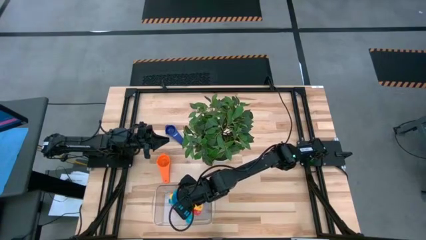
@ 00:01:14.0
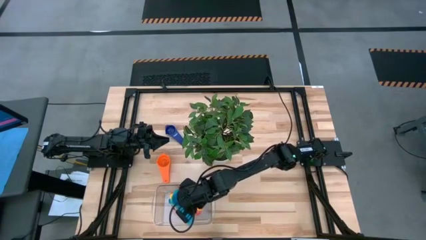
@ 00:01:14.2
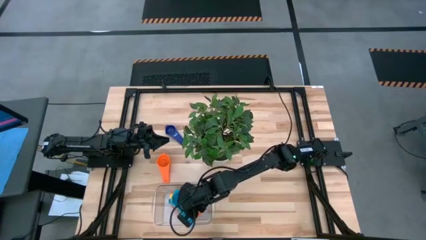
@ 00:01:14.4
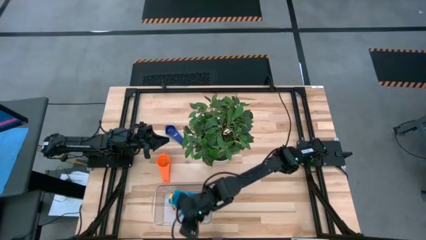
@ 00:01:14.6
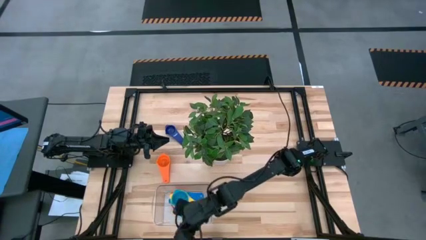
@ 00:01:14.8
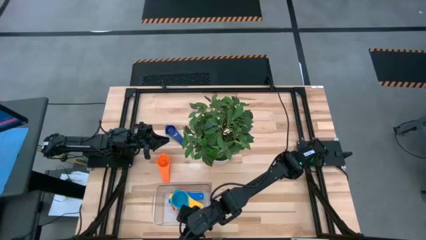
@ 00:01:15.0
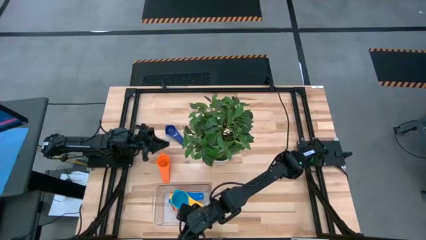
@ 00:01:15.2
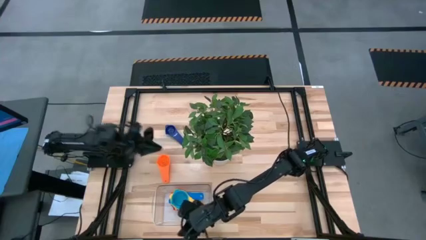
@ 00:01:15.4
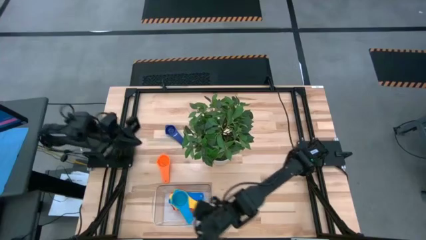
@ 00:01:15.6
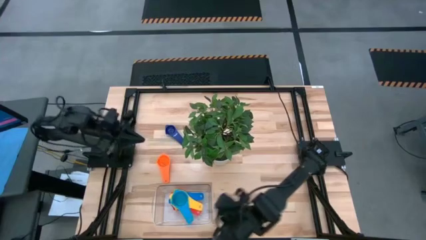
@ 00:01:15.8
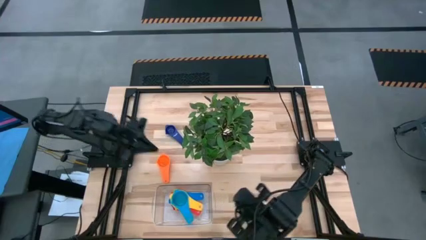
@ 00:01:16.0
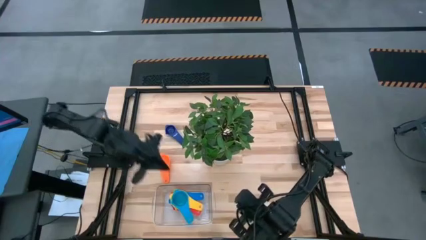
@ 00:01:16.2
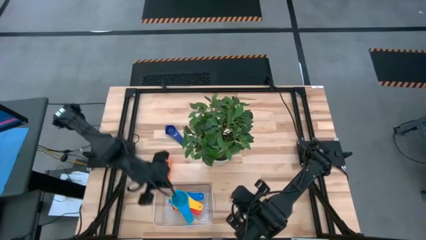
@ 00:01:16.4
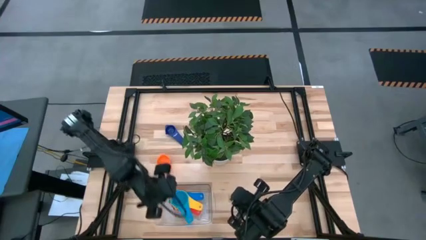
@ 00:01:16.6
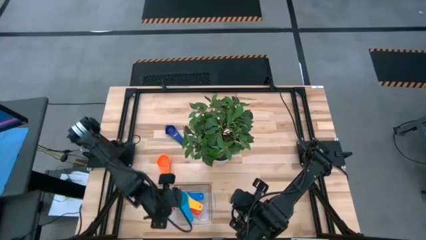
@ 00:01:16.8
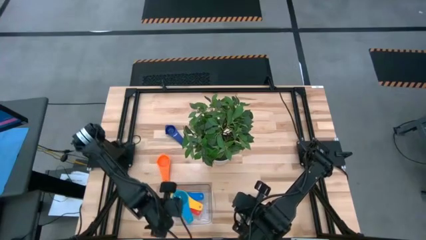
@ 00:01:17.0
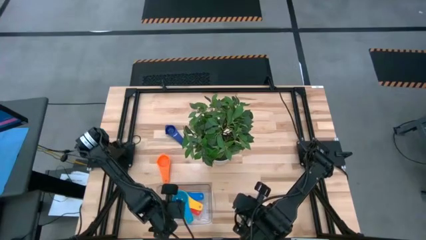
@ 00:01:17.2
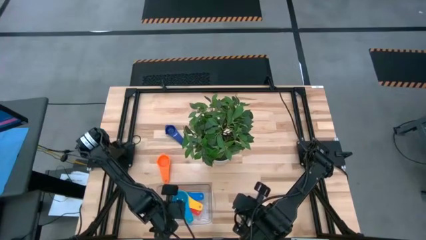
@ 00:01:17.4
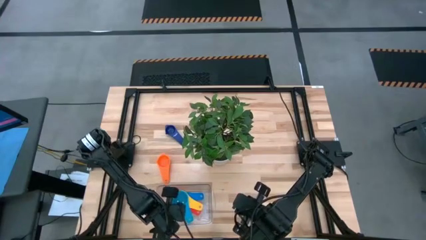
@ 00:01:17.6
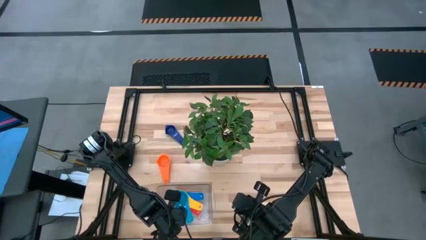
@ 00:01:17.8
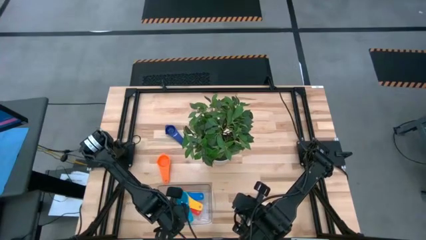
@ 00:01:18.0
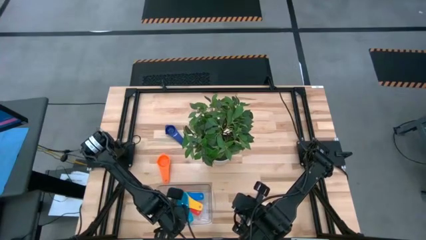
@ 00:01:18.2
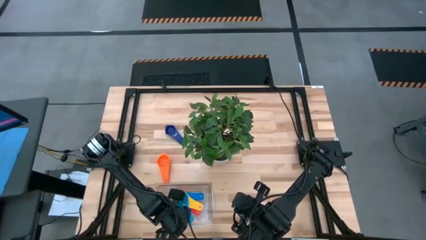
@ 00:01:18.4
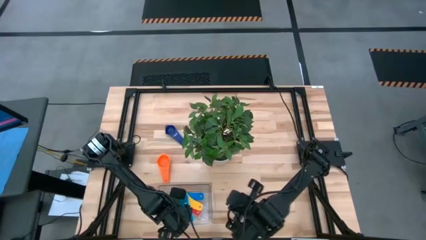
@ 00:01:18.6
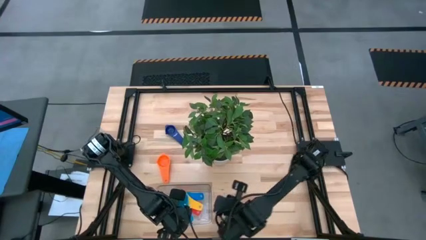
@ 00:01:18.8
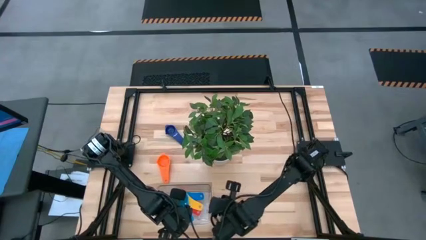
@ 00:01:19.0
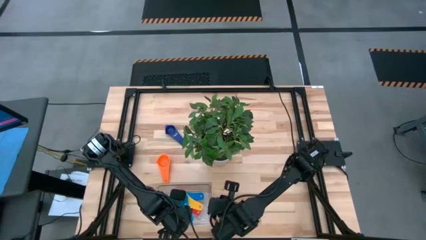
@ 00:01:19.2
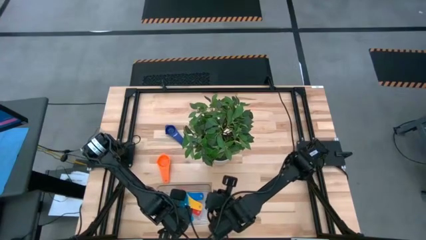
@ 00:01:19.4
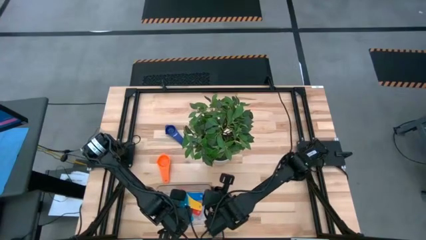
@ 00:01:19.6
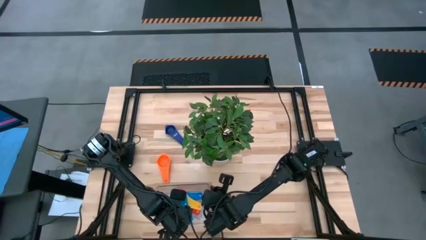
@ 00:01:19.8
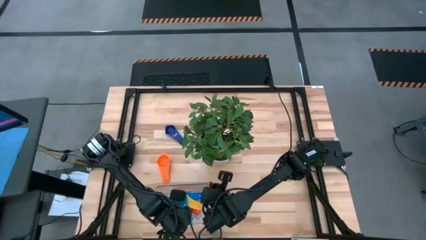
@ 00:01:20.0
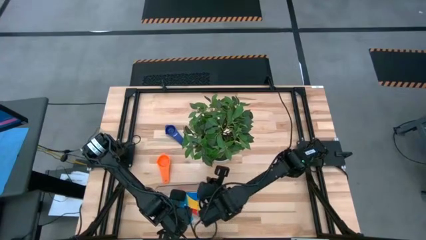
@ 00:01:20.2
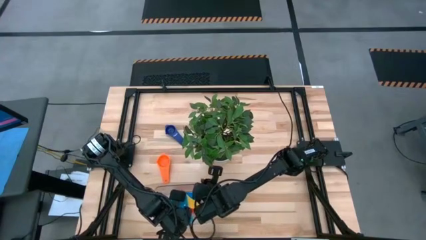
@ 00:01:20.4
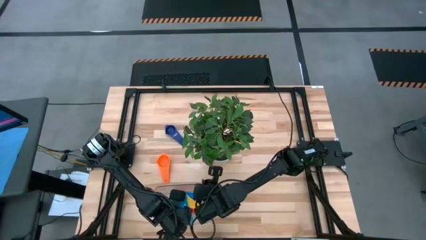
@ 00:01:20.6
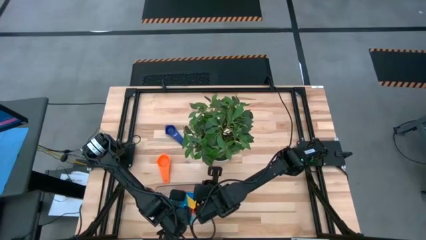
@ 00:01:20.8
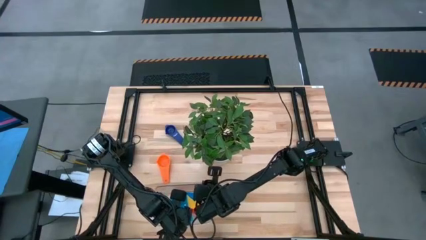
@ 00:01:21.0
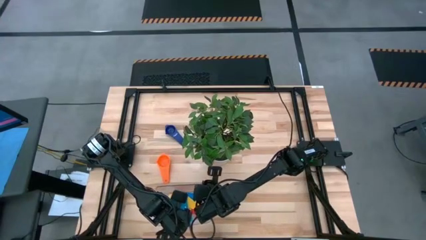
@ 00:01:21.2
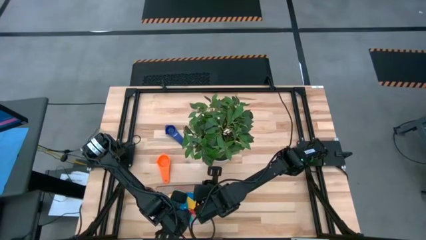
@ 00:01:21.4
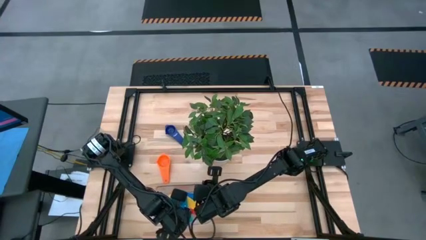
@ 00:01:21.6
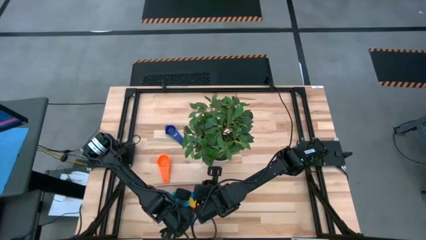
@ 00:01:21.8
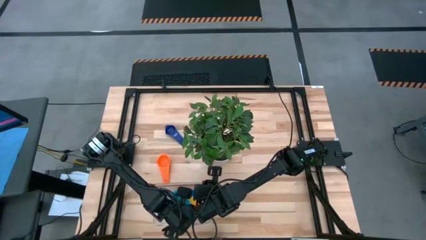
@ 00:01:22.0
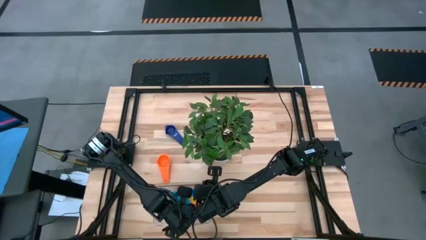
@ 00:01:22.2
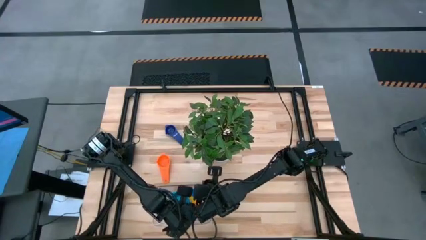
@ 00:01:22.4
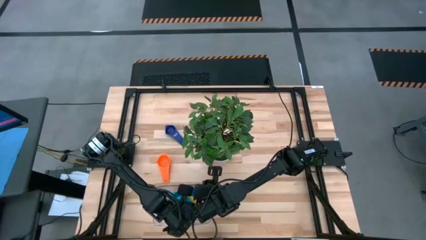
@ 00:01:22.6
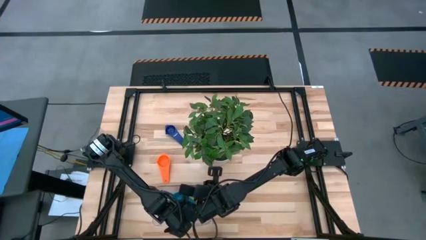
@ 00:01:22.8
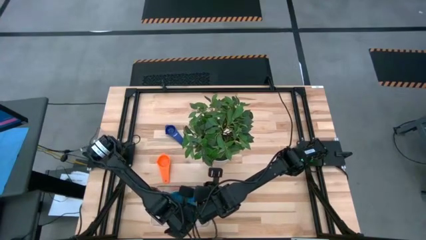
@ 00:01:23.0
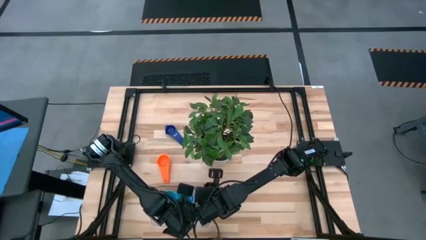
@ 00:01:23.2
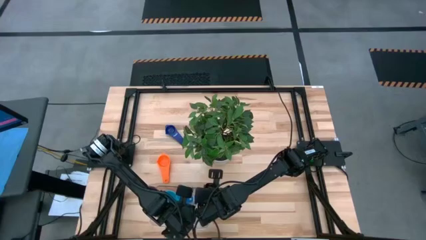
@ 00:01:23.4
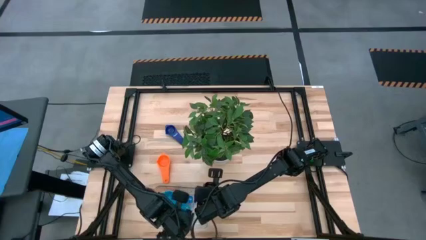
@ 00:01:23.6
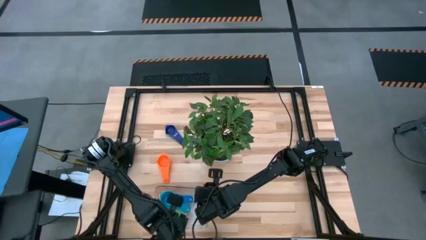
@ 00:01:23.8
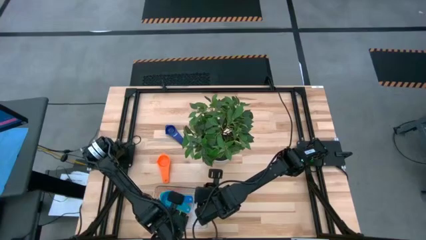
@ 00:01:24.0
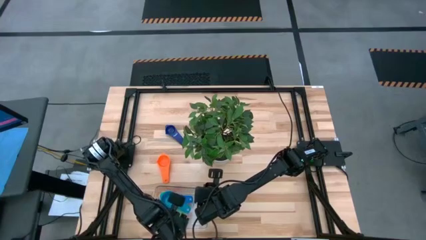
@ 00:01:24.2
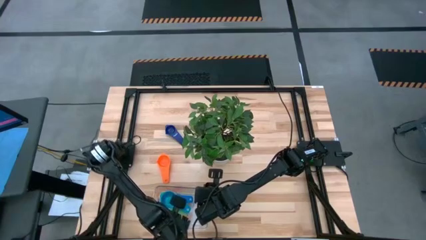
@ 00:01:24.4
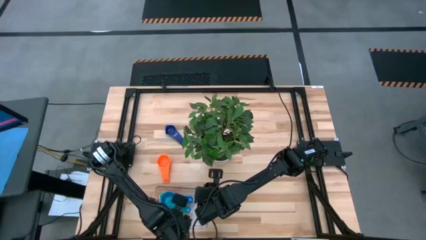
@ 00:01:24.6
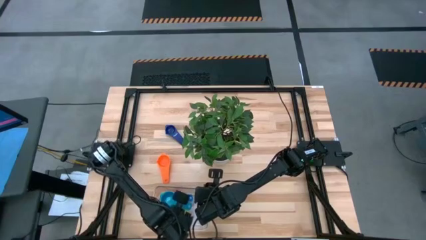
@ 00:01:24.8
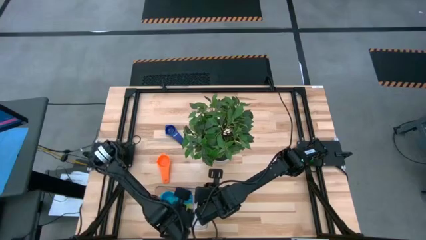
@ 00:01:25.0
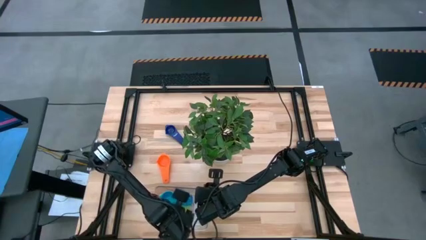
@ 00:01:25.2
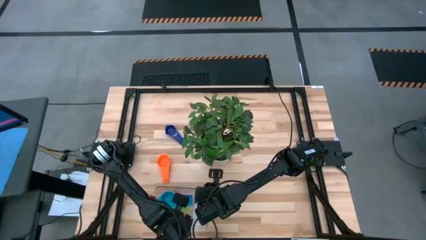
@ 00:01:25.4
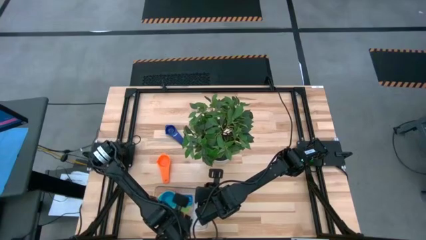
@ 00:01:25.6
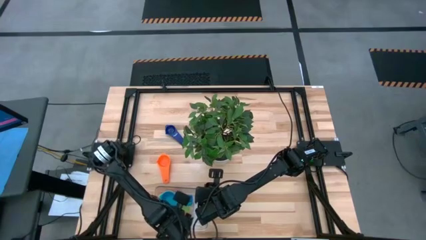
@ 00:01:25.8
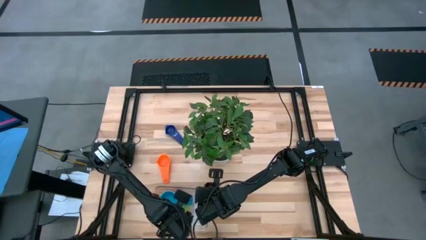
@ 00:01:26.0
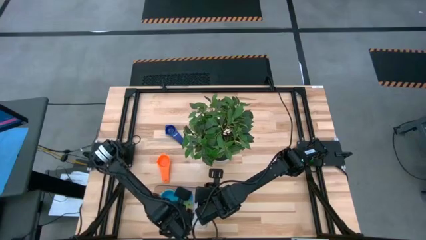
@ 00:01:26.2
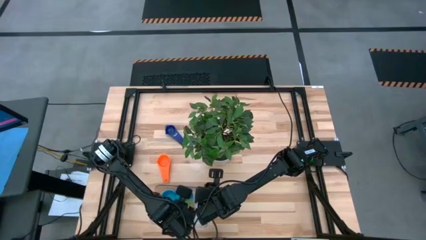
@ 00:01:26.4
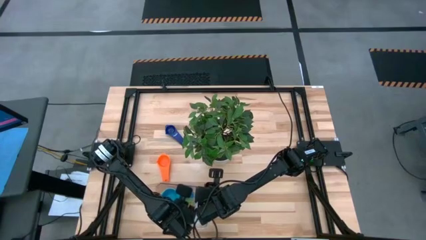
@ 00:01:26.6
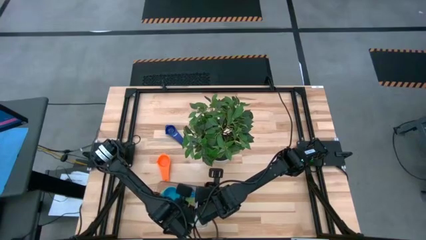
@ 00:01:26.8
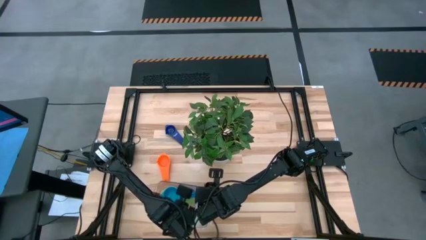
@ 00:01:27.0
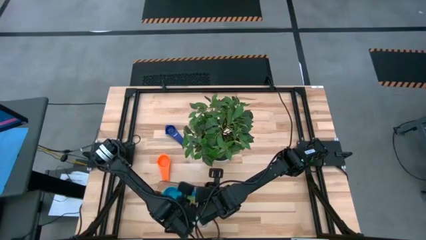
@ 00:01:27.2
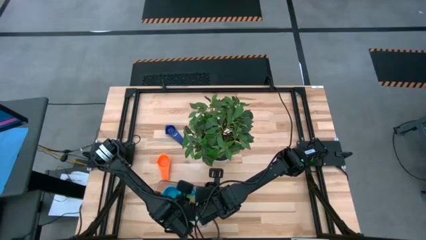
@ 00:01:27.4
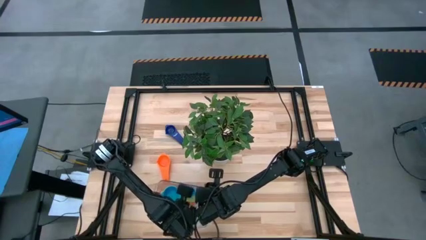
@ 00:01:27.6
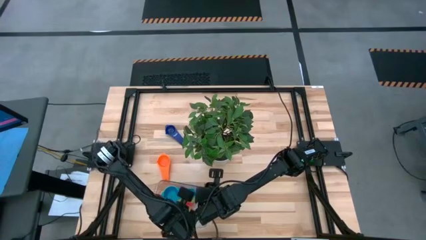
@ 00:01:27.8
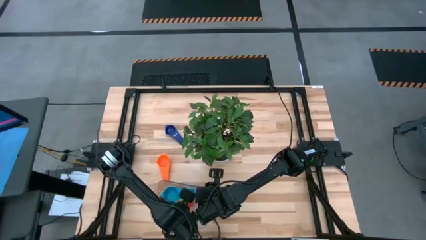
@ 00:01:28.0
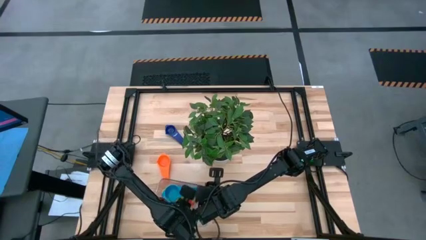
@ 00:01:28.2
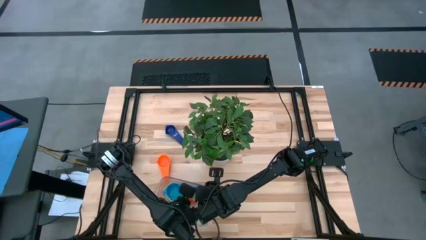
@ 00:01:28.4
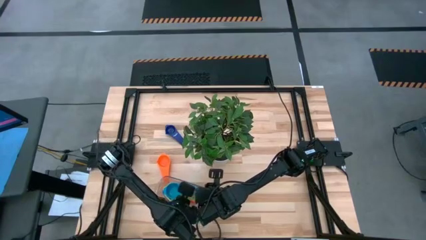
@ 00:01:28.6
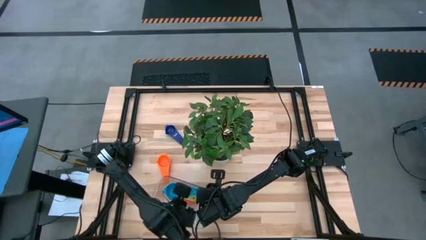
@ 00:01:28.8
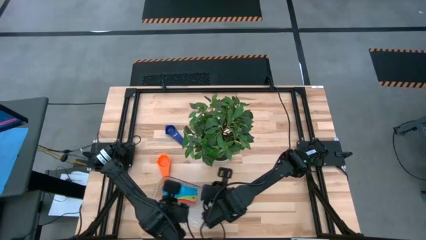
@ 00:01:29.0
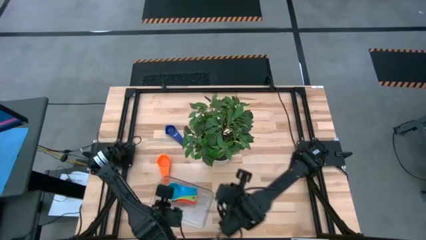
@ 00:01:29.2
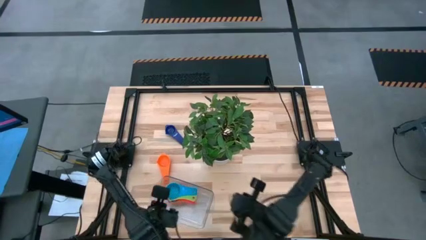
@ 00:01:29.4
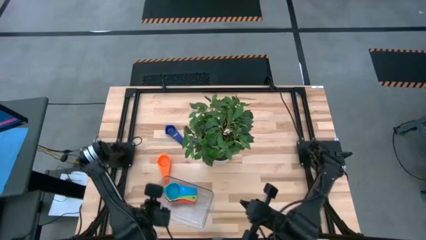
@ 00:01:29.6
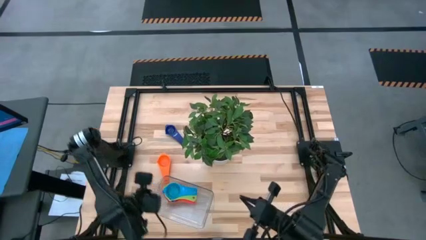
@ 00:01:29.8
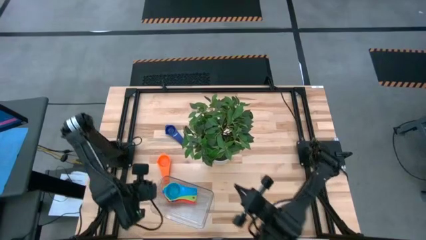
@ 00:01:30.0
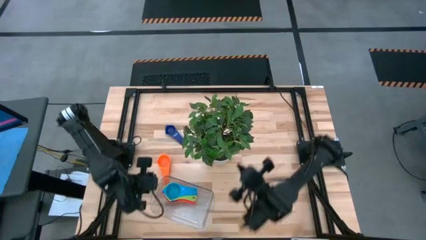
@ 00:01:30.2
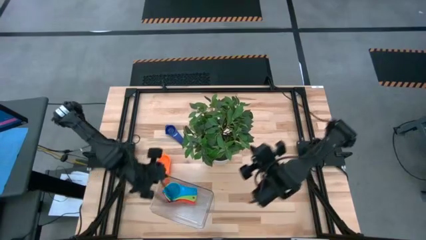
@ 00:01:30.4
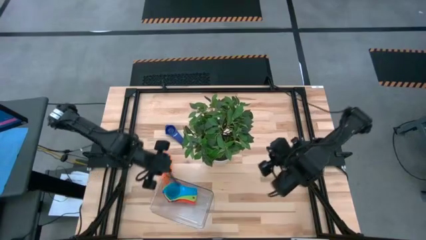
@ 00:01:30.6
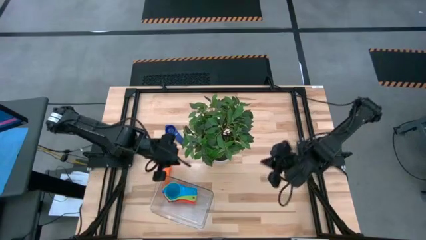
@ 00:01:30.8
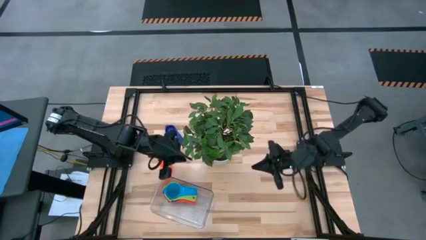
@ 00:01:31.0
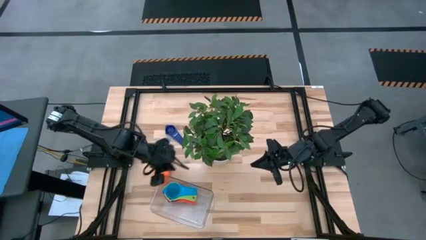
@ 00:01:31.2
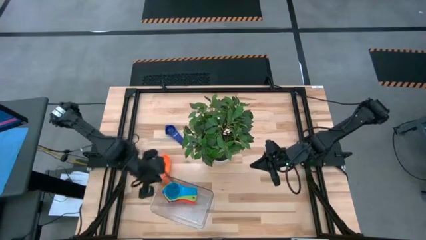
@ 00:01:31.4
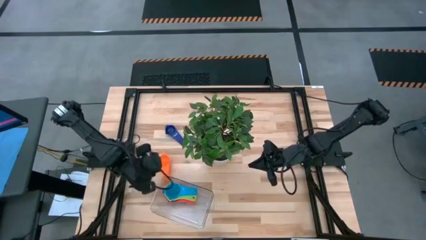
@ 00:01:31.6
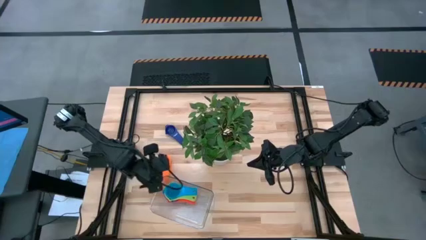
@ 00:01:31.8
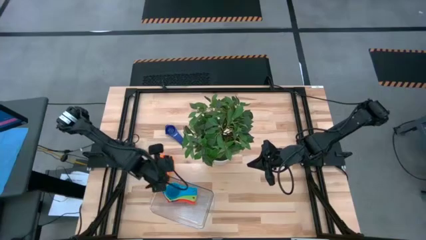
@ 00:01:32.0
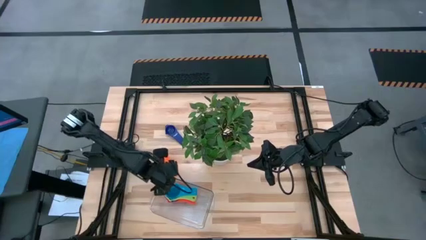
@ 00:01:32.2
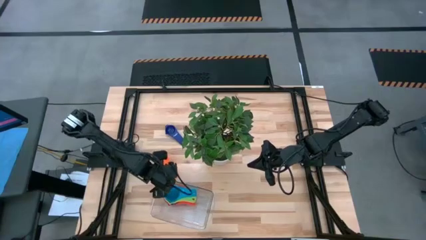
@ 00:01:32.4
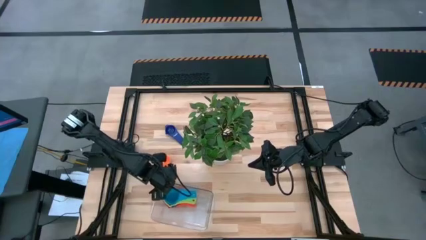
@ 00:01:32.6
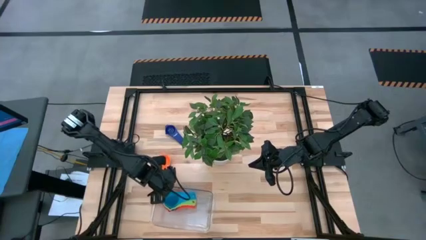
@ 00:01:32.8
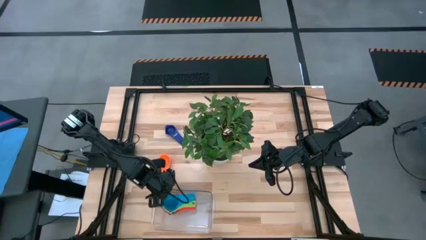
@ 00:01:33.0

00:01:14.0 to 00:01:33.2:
Task: Nest measuring cups in basket
Adjust the measuring cups inside the transparent bin
